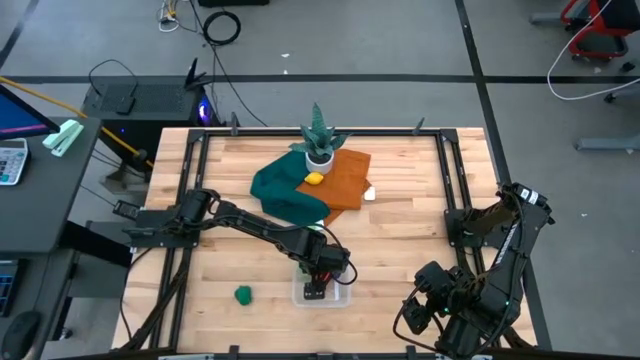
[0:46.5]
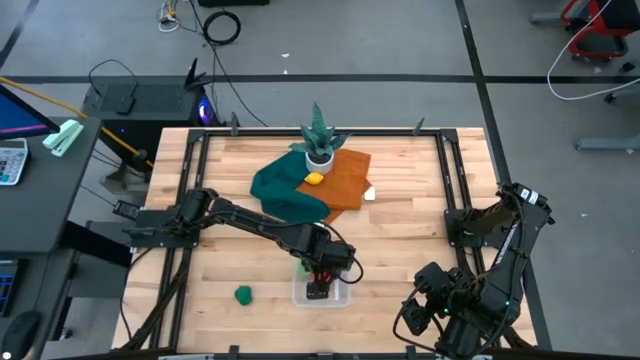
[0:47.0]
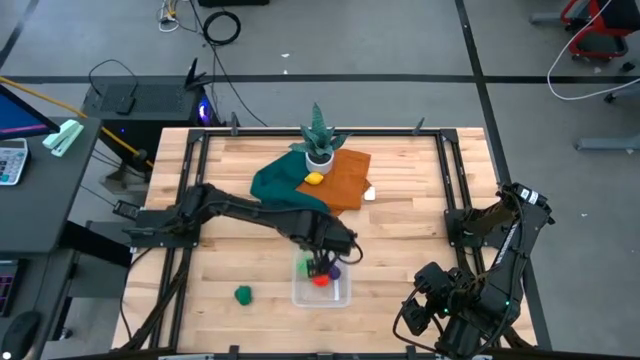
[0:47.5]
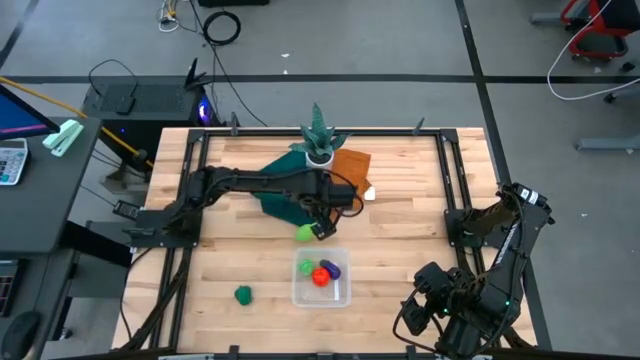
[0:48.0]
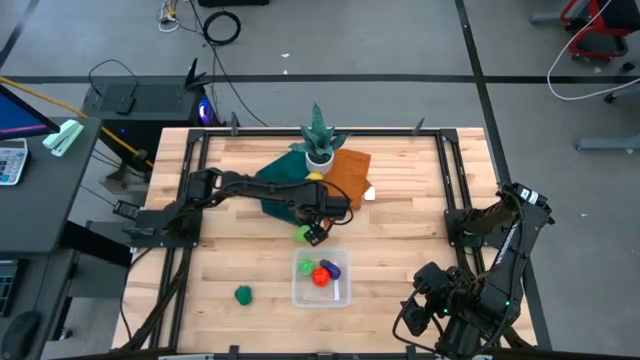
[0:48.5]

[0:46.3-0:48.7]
Task: Pick and placing Produce into tupperware
Put the green melon into the transparent bin

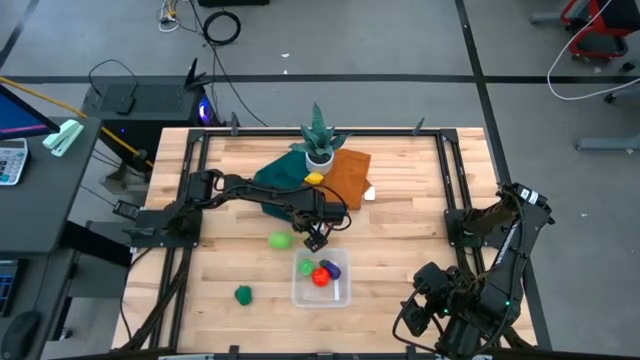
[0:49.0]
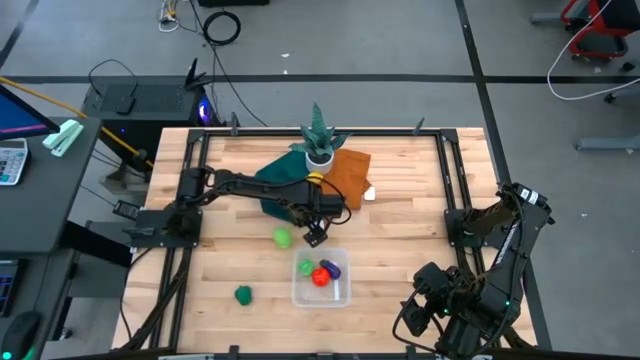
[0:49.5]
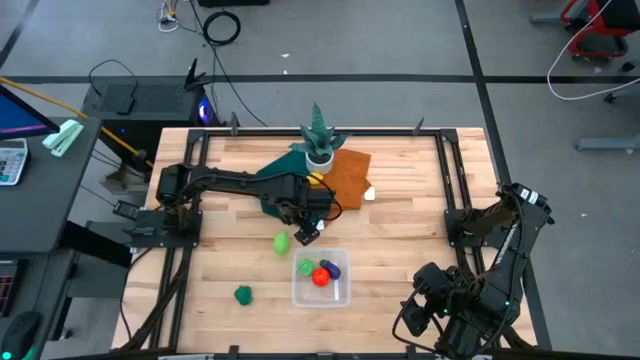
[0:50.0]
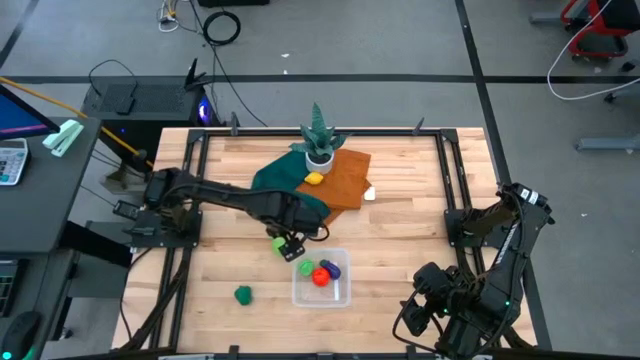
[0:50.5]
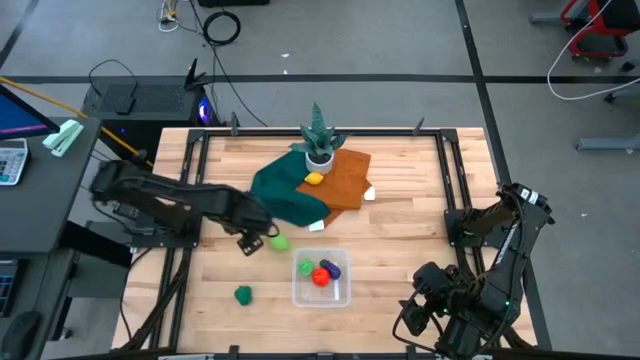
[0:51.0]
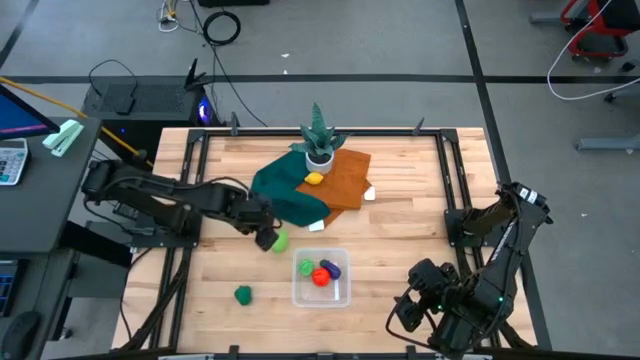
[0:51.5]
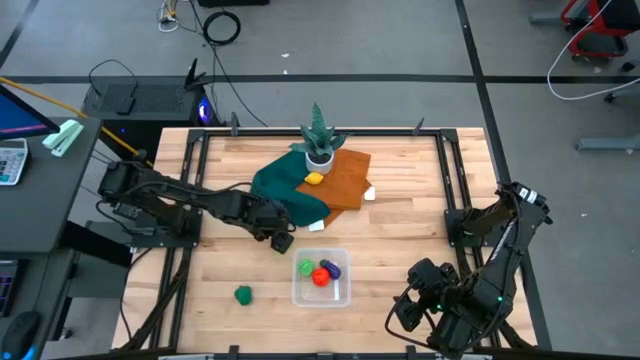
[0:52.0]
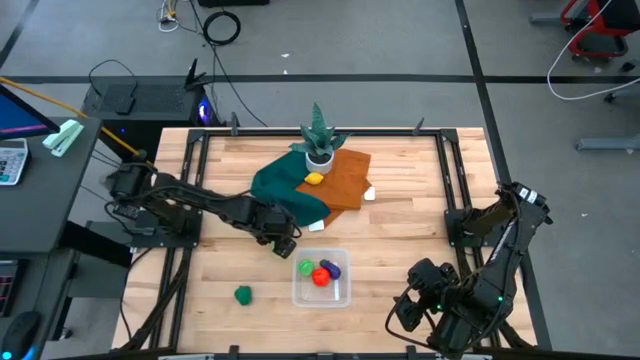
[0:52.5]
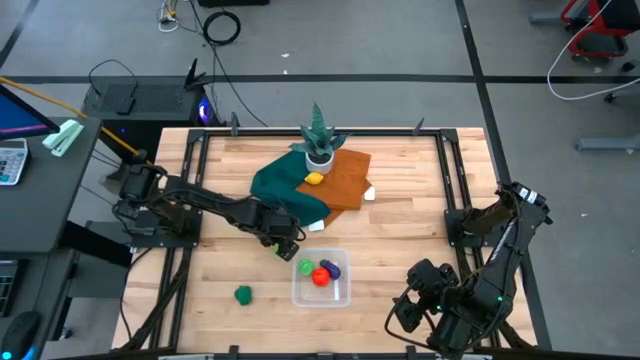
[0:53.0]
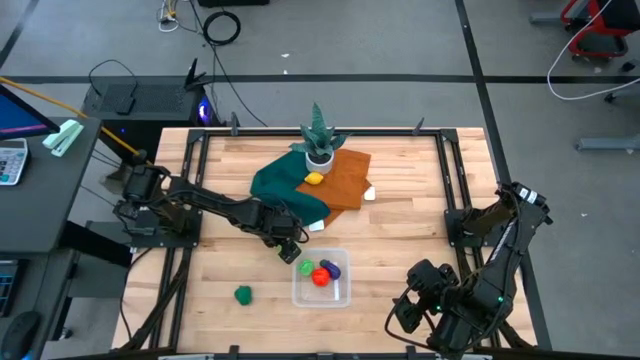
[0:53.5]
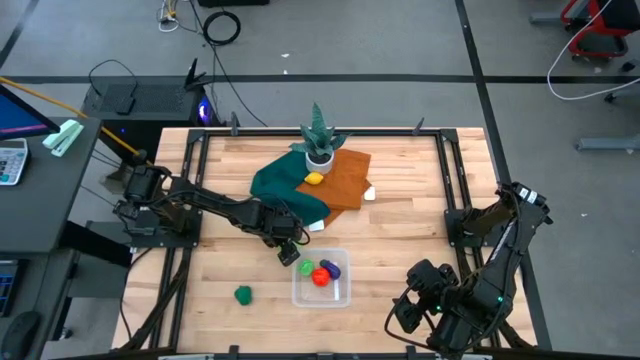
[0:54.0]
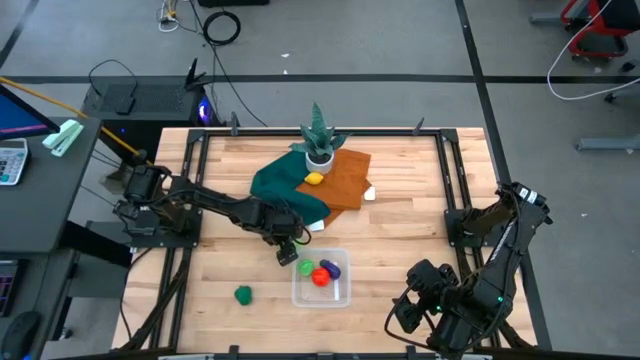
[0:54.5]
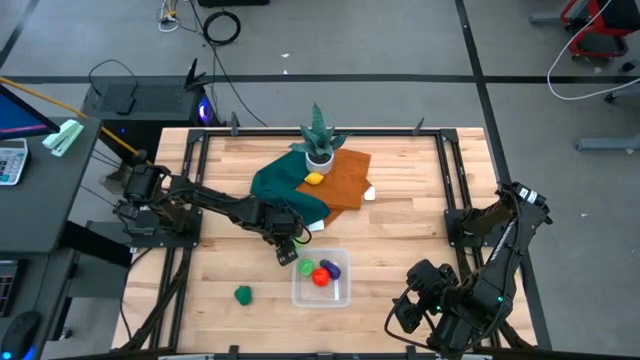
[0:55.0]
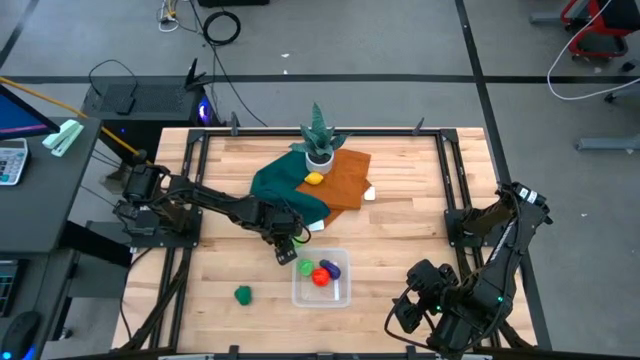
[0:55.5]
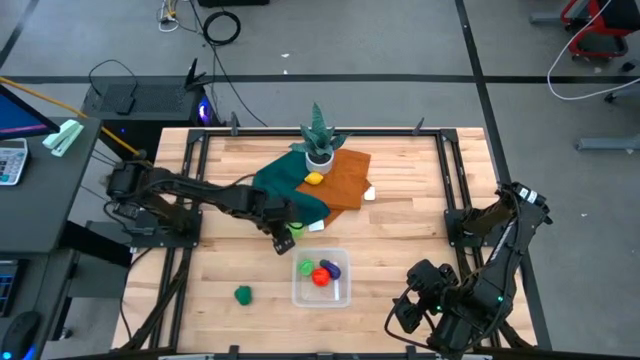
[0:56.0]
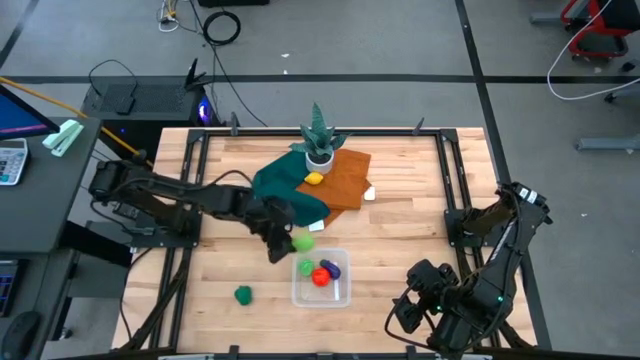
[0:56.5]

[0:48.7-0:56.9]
Put the green melon into the transparent bin

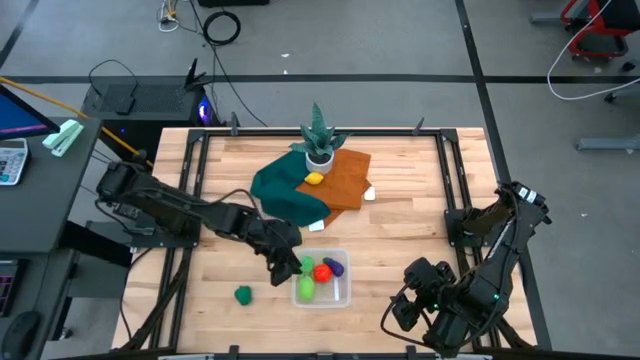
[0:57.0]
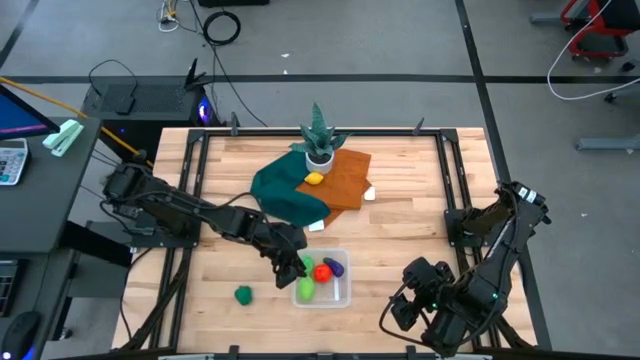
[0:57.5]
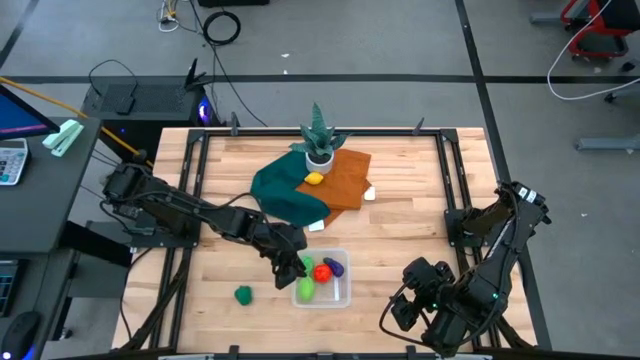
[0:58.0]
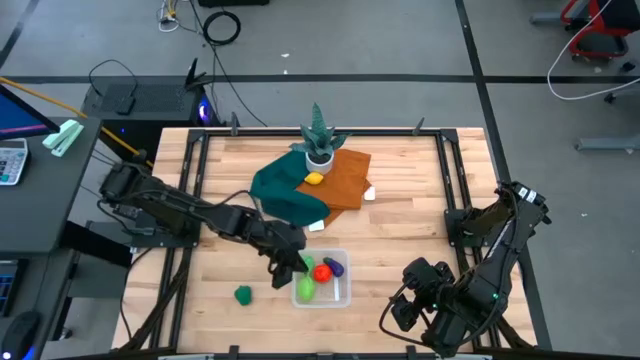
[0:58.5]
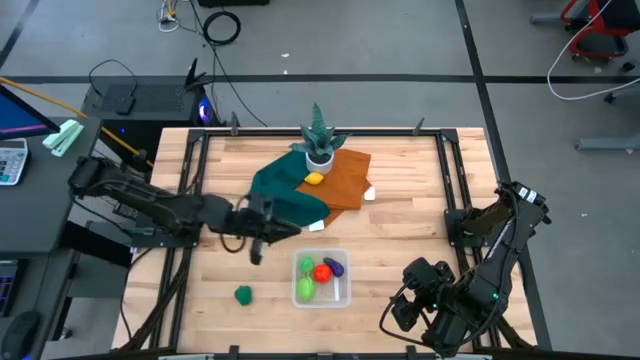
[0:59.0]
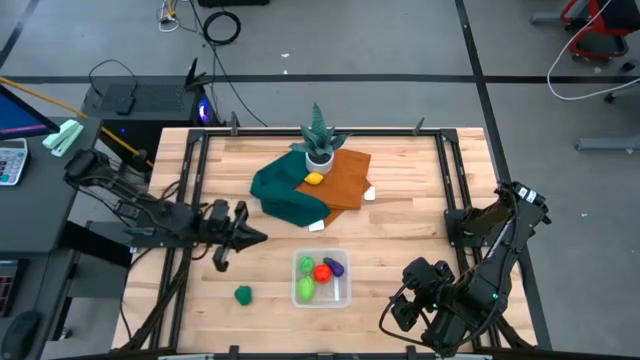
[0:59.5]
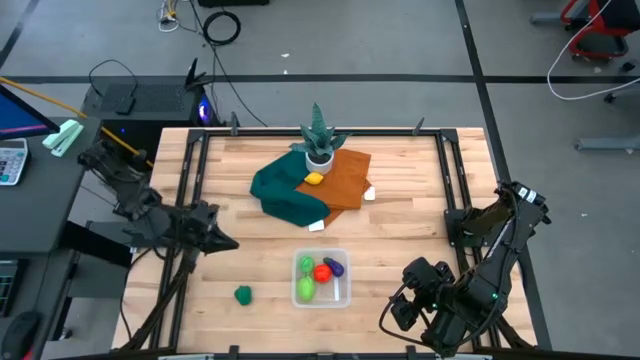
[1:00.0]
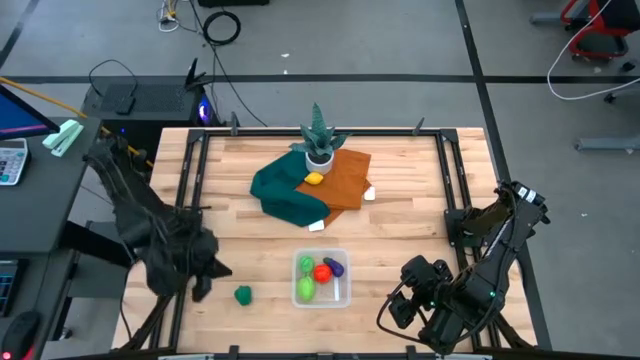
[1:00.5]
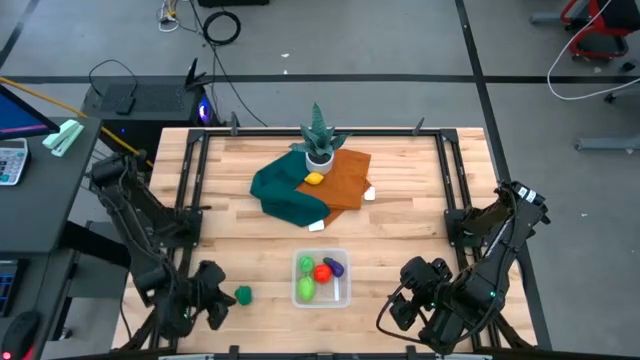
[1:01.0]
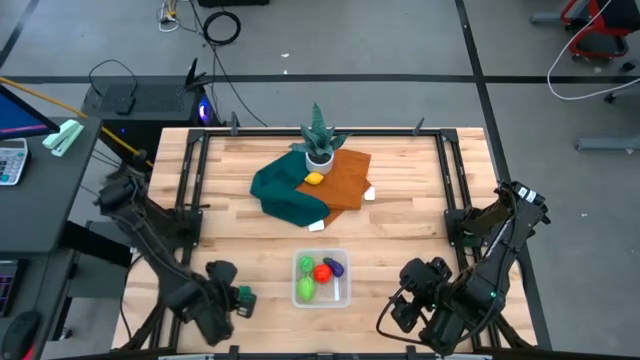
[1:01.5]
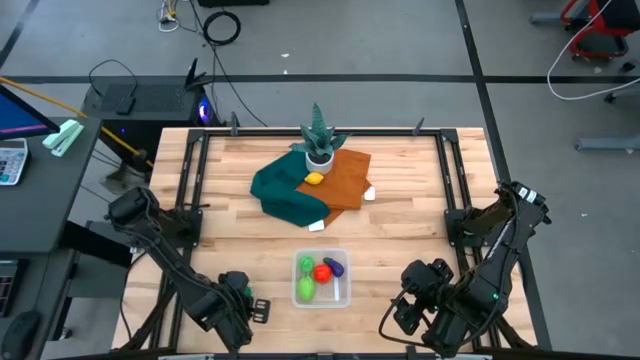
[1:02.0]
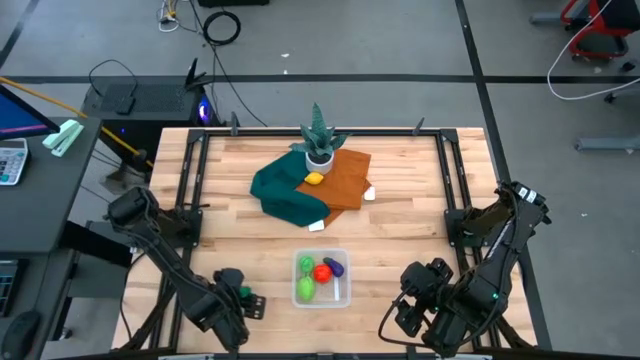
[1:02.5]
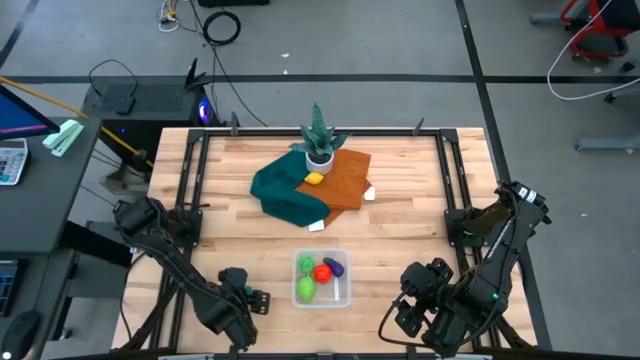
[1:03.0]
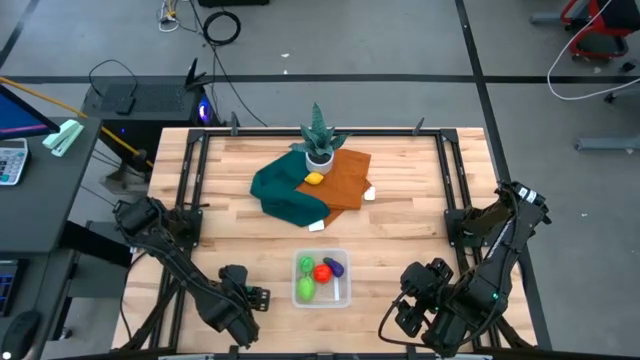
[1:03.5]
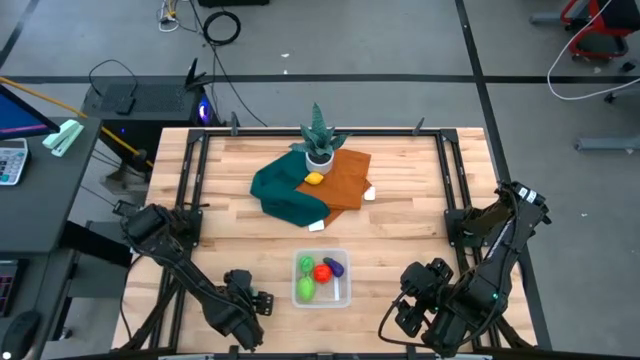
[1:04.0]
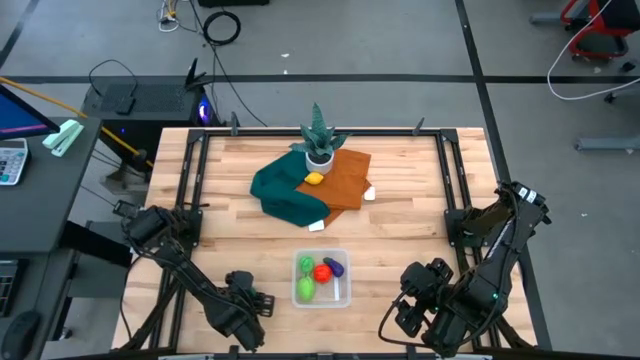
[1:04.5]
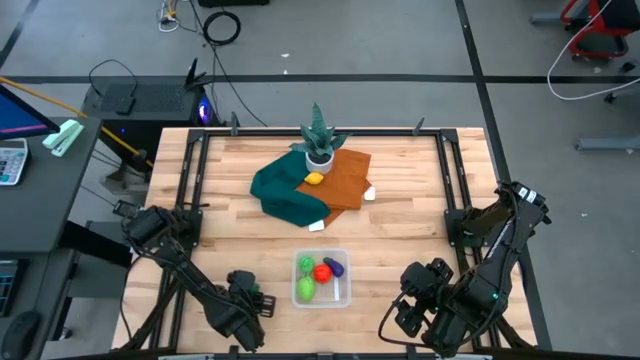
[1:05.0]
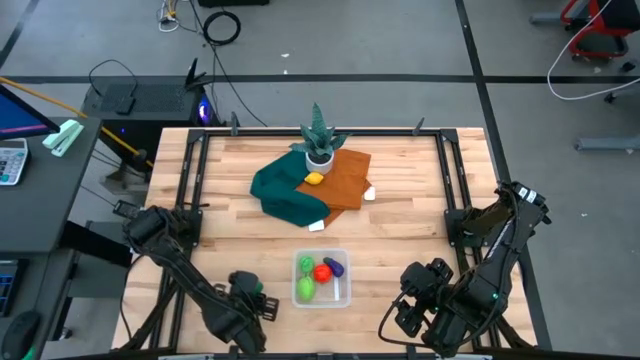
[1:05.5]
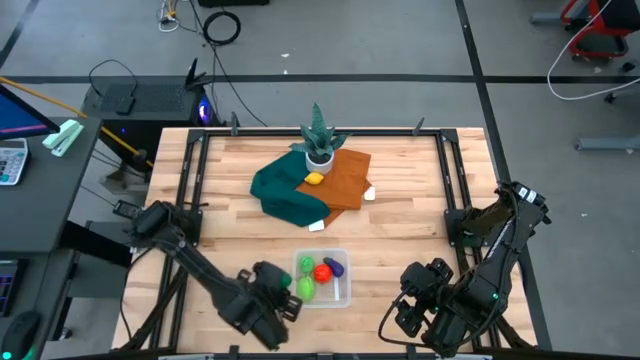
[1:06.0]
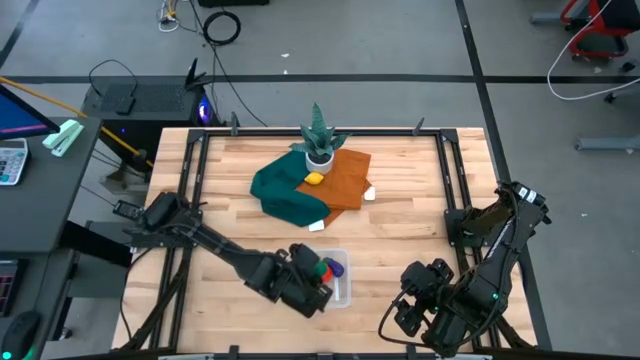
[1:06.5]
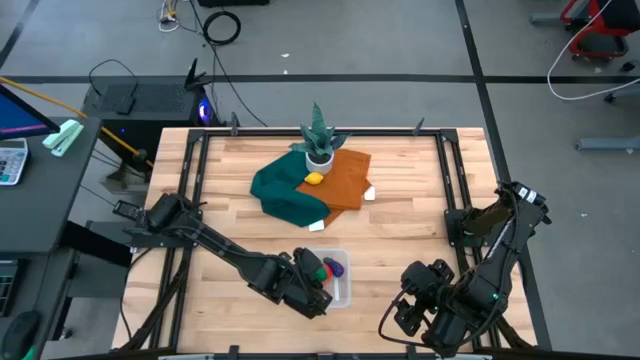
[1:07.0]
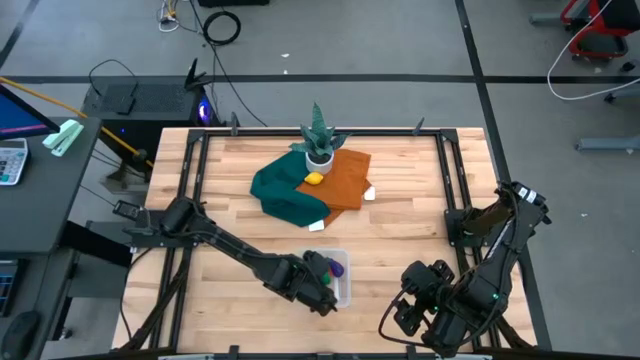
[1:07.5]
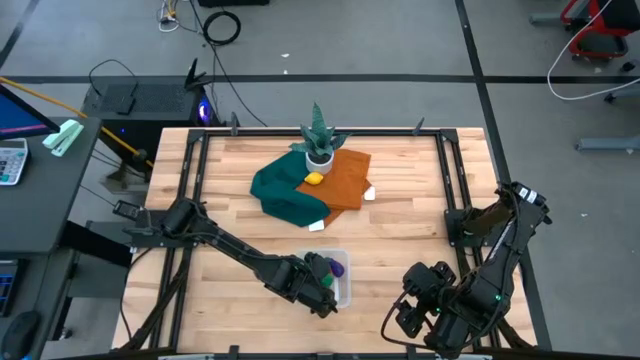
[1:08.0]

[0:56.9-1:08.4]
Put the green bell pepper into the transparent bin
